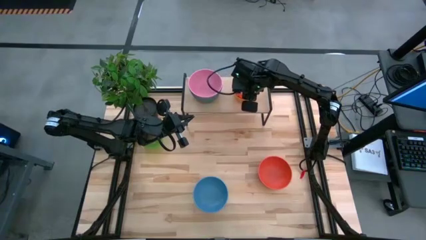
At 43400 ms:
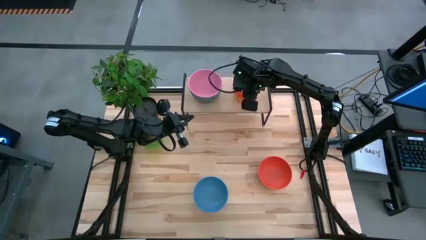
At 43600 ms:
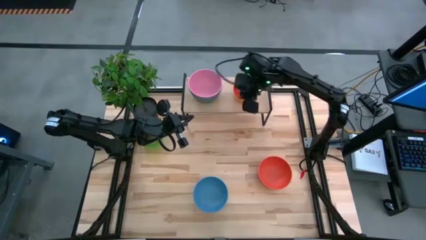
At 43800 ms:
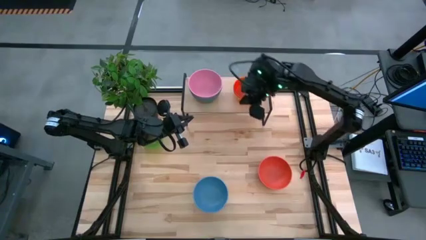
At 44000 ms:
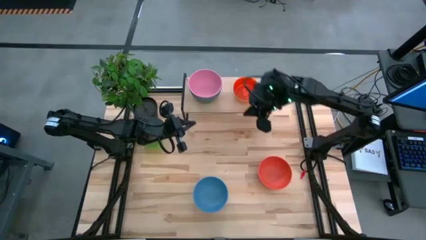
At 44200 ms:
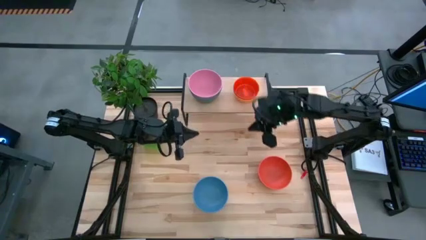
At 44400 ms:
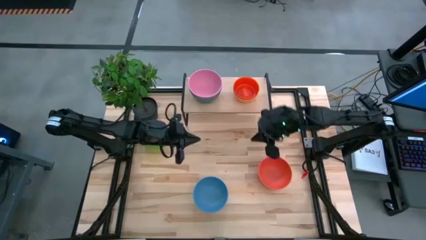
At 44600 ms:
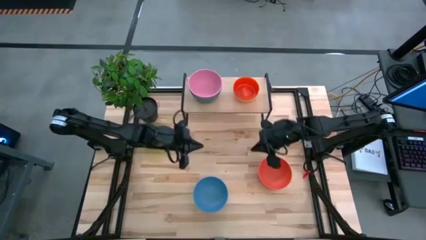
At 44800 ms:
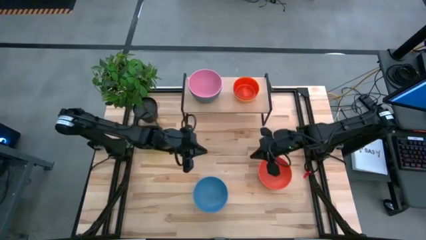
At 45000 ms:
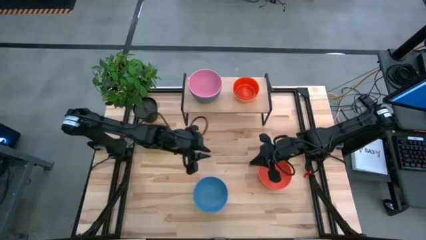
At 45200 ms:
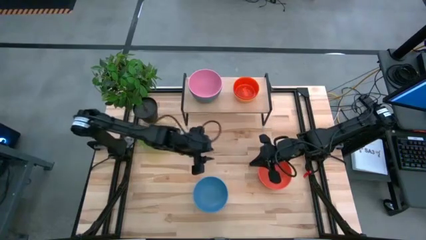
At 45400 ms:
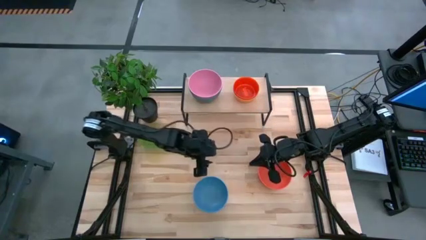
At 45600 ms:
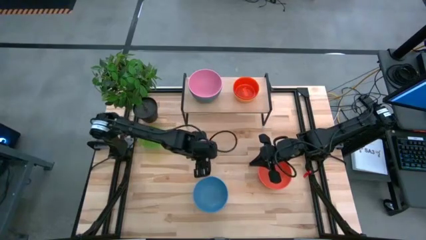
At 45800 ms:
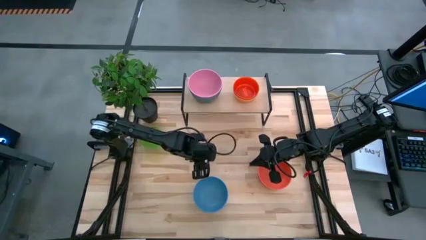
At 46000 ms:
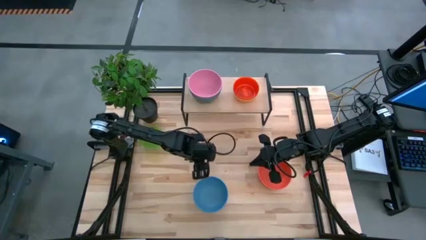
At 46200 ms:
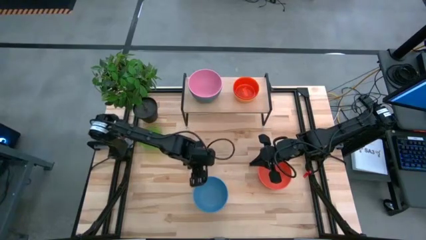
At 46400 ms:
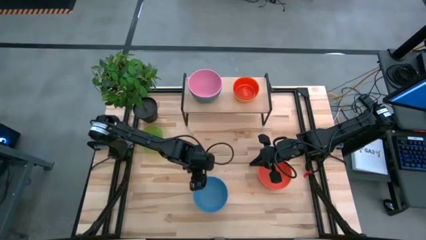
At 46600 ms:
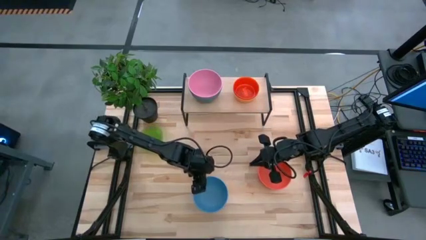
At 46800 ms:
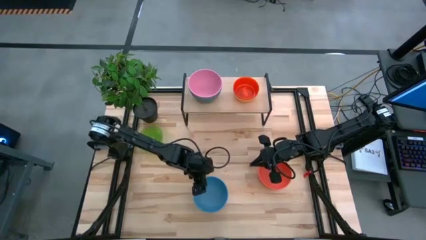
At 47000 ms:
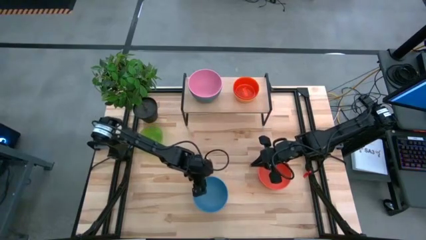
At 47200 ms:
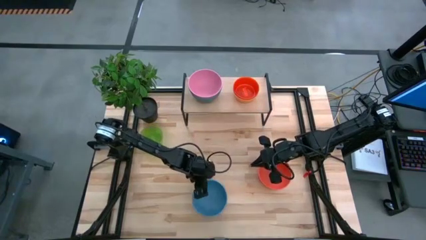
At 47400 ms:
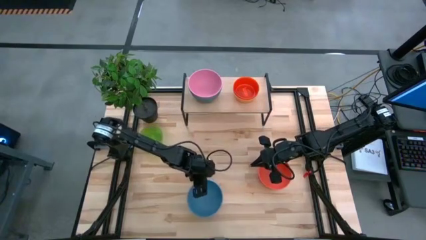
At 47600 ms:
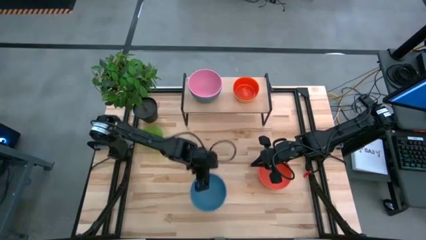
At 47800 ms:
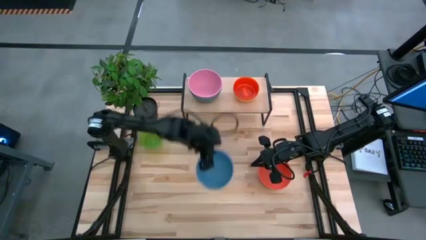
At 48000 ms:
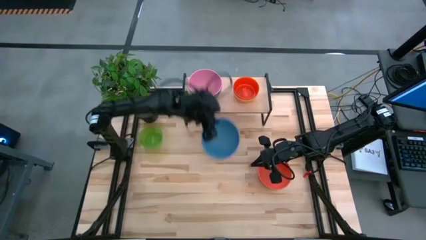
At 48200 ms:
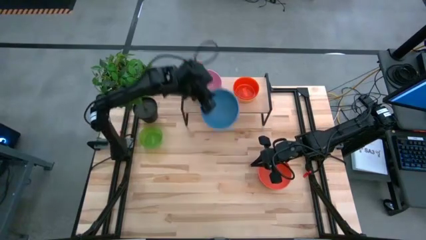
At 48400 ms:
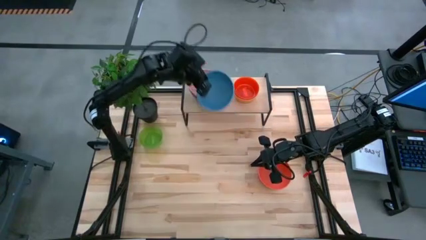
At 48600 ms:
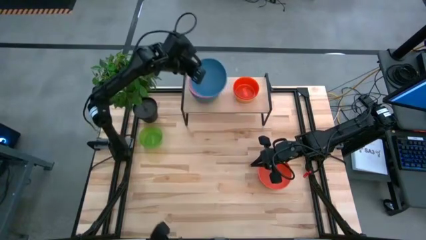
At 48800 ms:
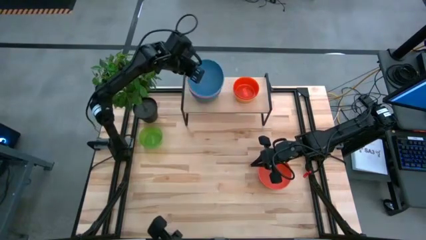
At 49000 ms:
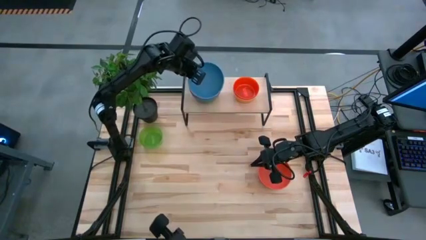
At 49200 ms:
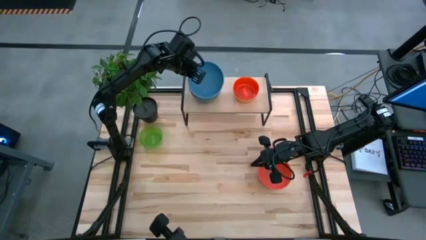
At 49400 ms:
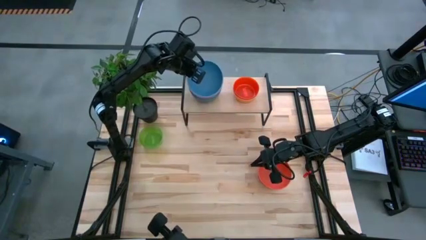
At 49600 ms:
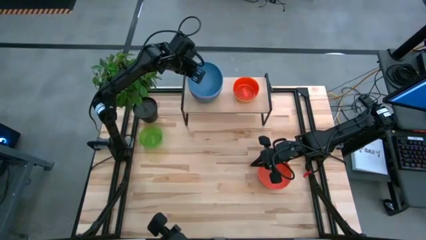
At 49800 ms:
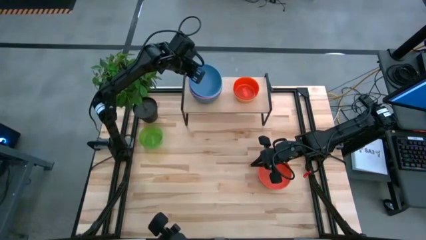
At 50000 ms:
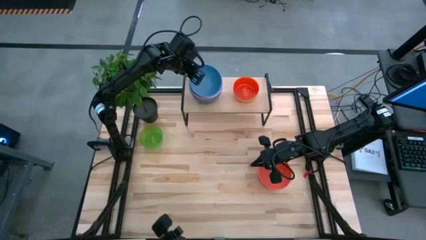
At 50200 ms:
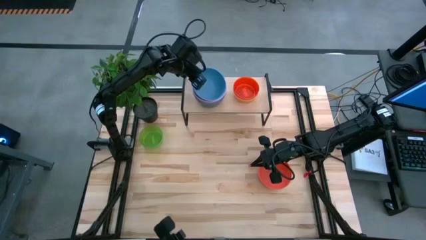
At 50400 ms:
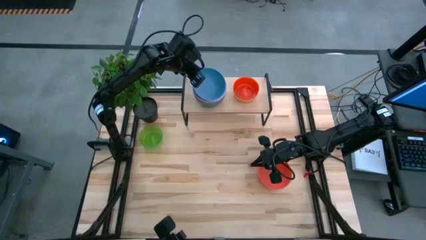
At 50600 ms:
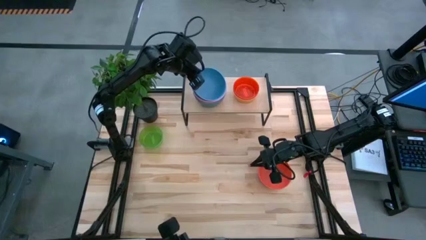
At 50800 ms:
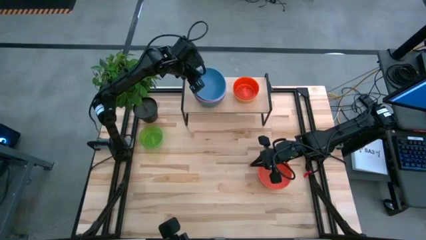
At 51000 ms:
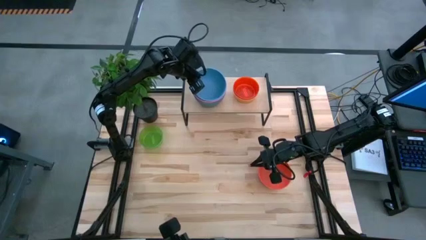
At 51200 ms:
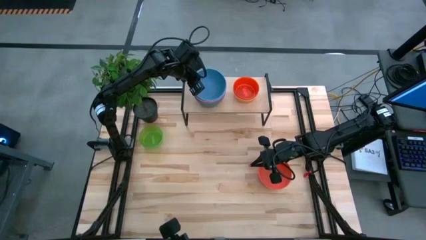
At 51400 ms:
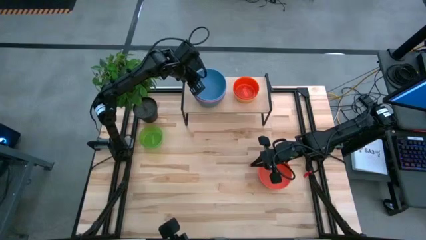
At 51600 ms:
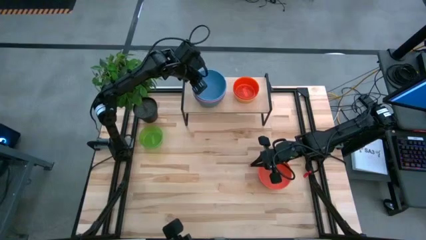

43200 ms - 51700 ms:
Task: Place and stack bowls onto a shelf
Stack the big blue bowl on top of the big pink bowl

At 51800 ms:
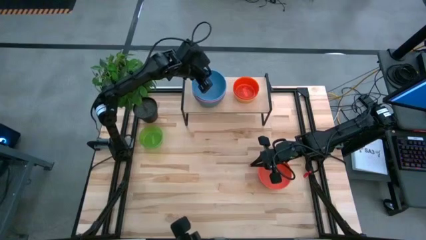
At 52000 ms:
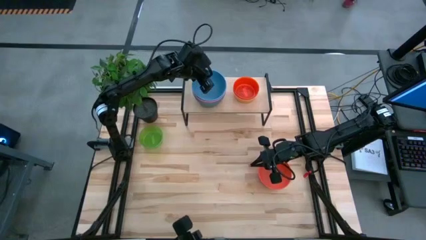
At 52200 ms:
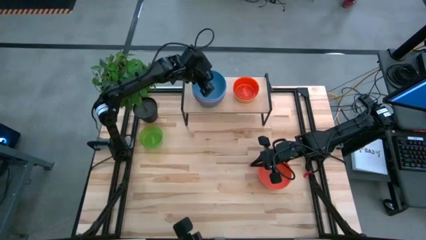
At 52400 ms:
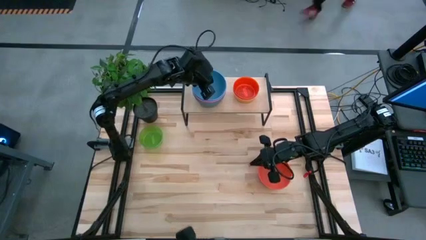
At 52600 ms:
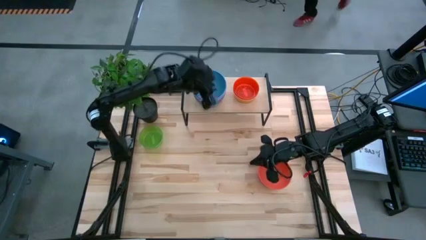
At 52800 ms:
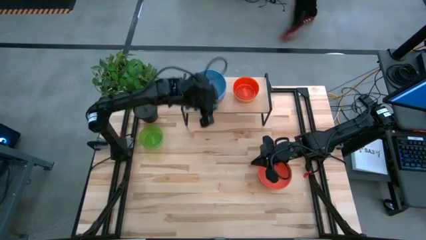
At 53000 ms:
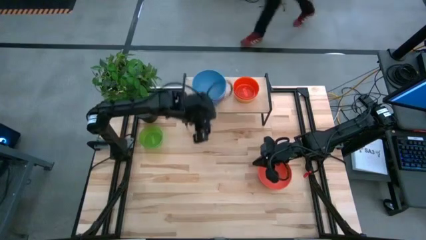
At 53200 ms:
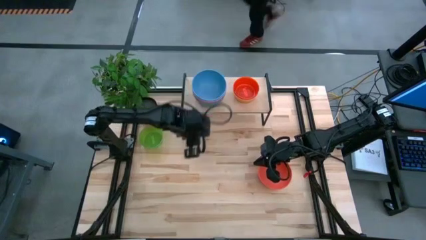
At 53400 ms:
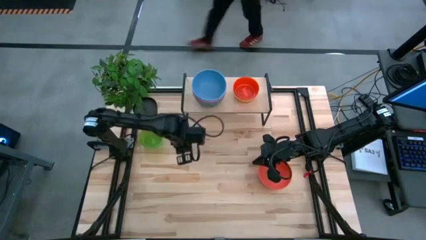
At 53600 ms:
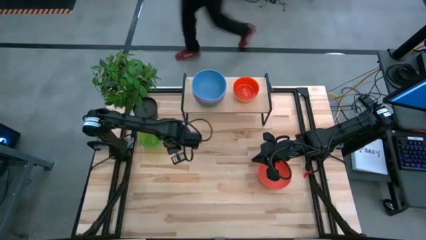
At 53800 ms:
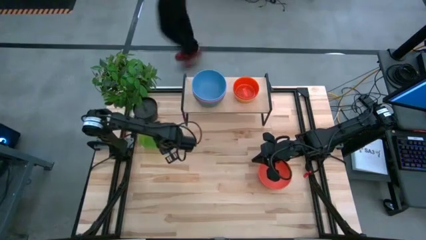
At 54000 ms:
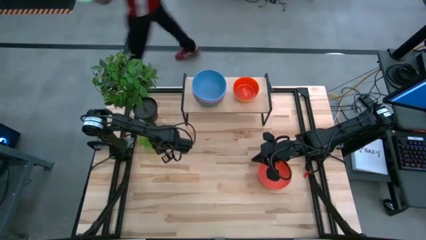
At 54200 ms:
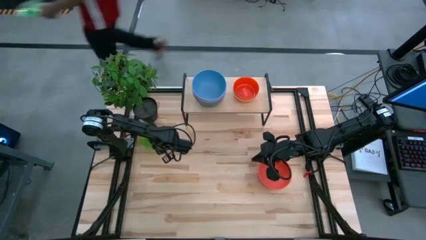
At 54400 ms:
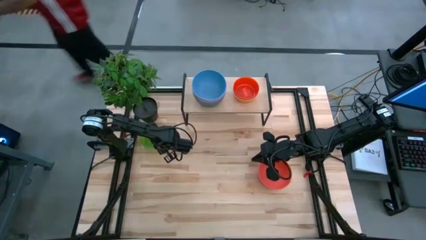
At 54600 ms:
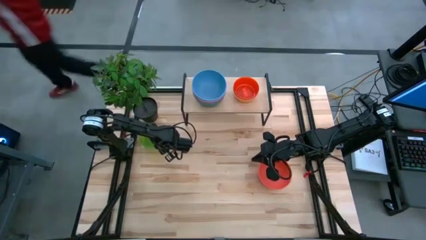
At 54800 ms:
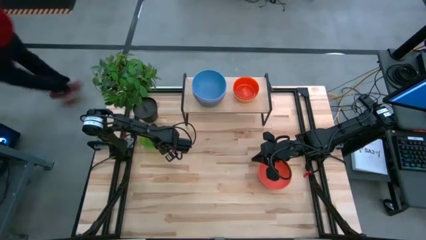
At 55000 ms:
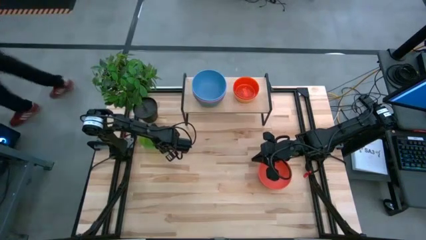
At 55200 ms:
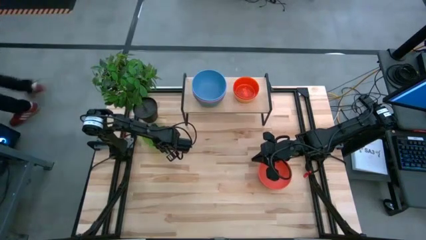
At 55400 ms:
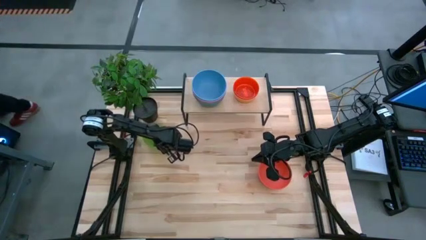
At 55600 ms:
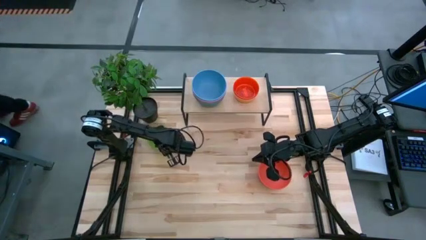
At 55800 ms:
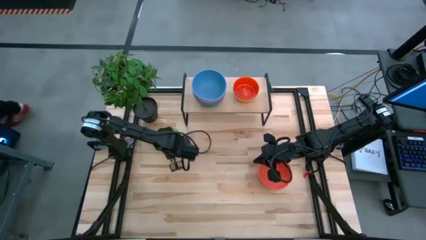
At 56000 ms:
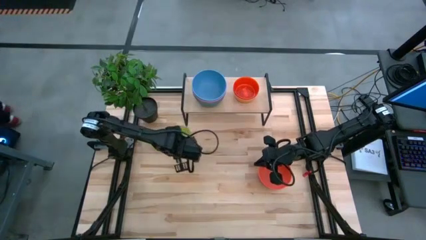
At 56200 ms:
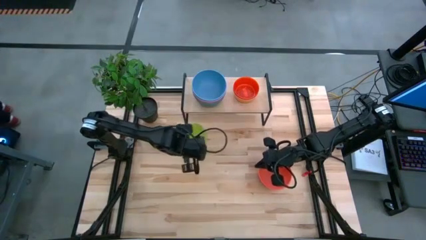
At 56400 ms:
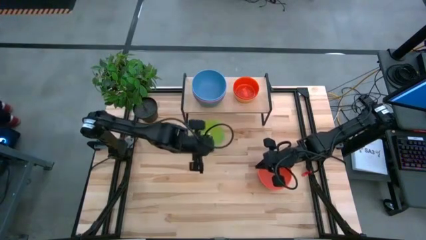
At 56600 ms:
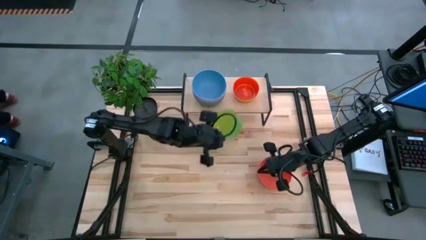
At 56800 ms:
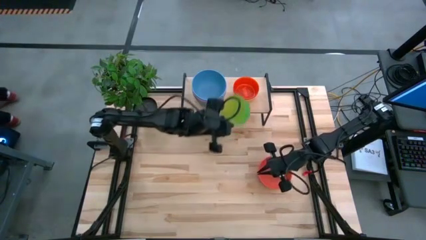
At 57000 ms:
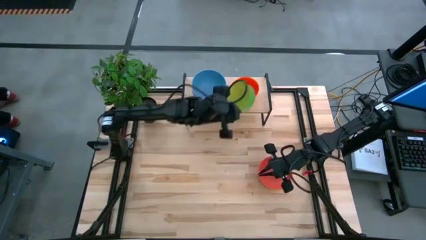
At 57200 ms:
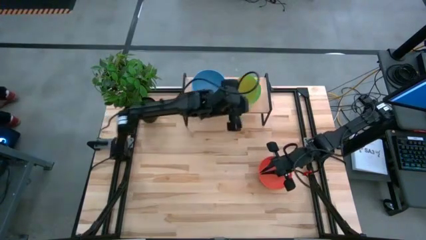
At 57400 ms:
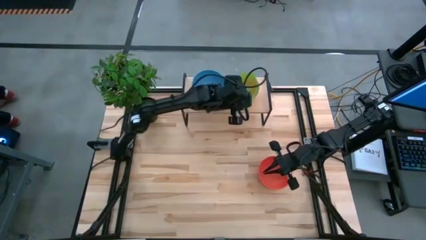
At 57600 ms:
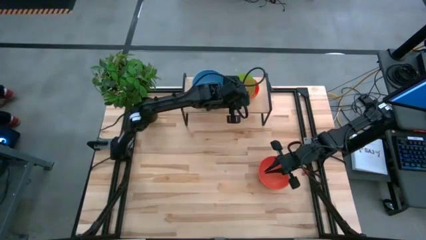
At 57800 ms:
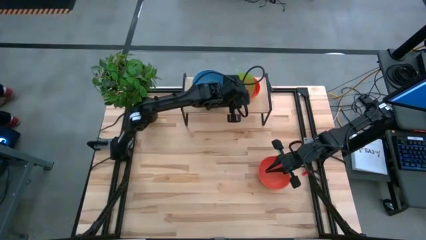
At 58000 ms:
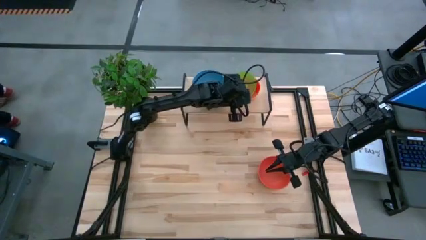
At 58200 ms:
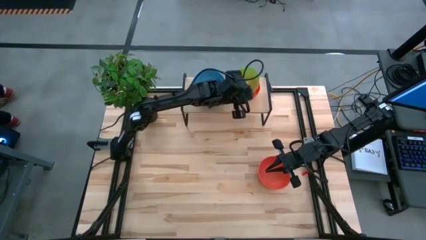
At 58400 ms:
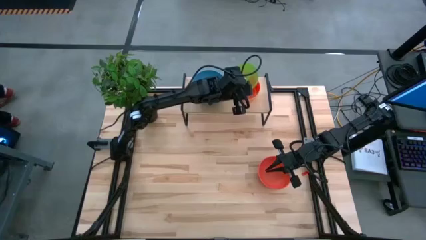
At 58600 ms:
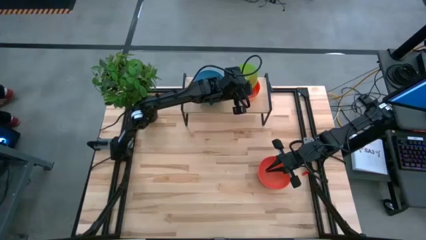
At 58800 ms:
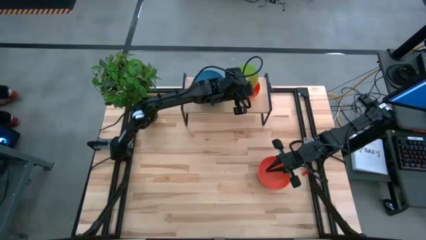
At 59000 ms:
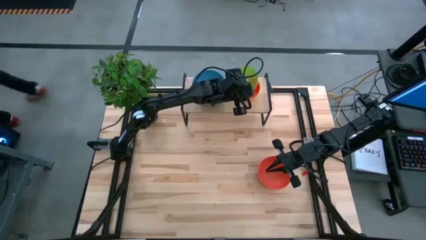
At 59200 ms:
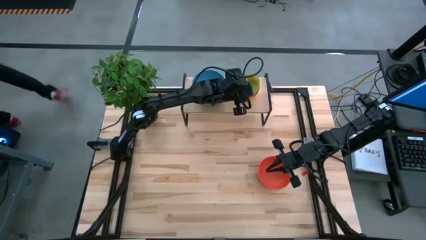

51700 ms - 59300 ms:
Stack the small green bowl on top of the small orange bowl
